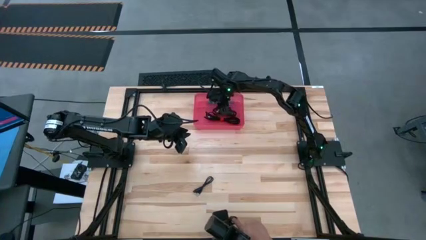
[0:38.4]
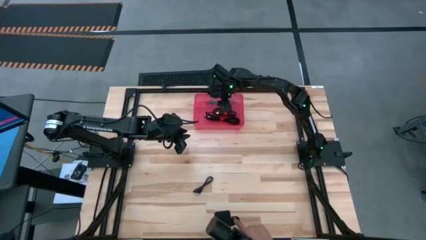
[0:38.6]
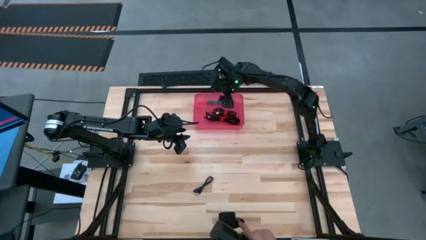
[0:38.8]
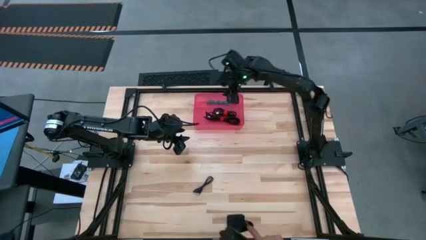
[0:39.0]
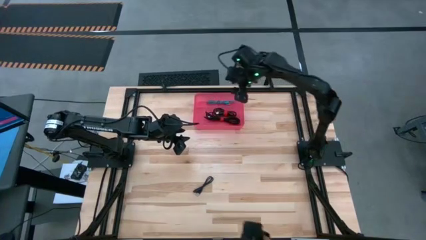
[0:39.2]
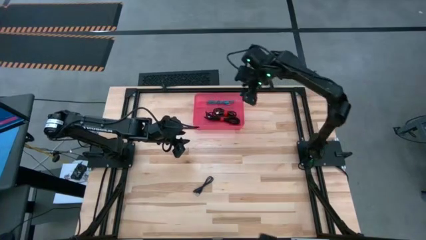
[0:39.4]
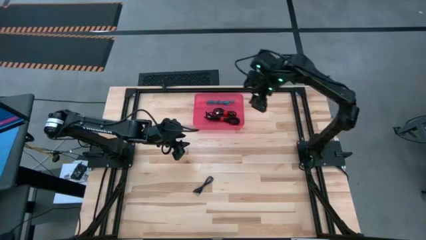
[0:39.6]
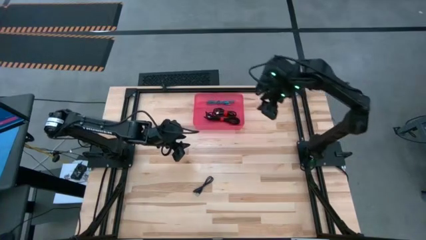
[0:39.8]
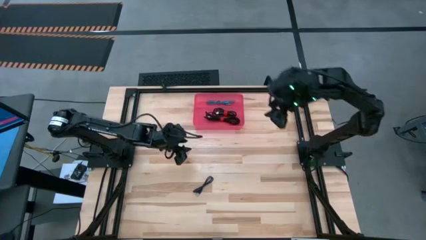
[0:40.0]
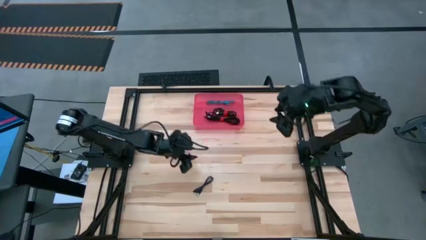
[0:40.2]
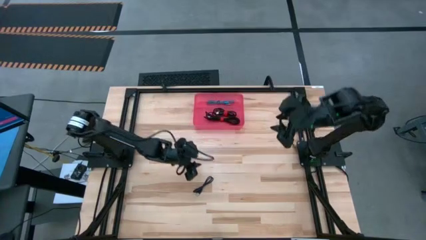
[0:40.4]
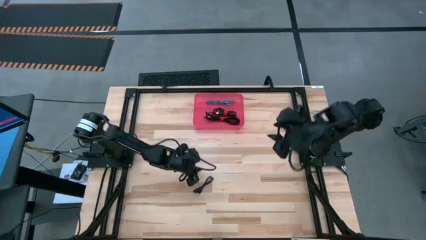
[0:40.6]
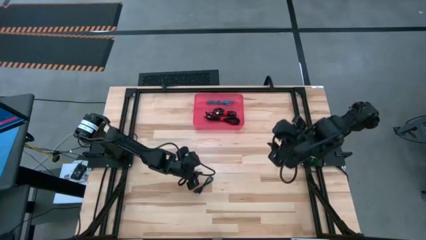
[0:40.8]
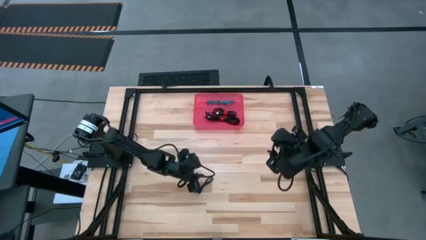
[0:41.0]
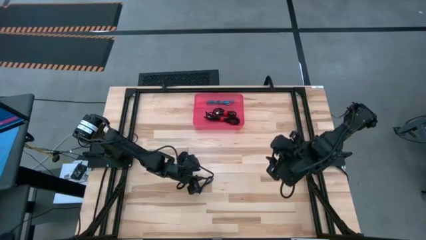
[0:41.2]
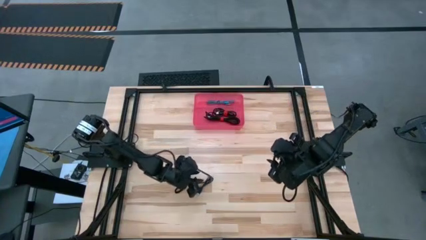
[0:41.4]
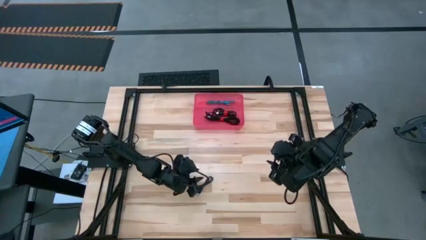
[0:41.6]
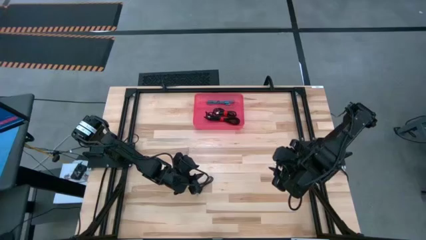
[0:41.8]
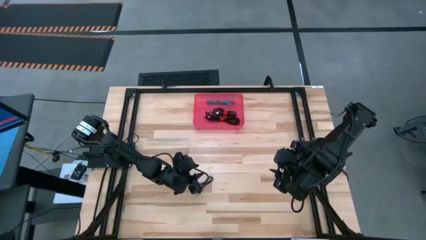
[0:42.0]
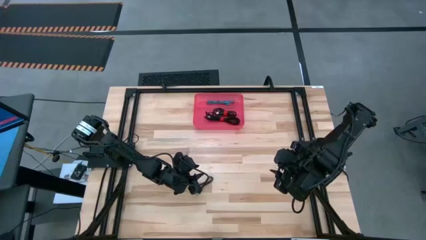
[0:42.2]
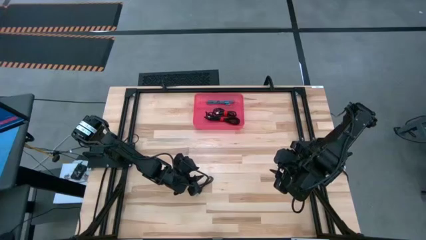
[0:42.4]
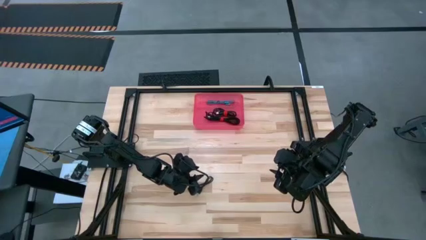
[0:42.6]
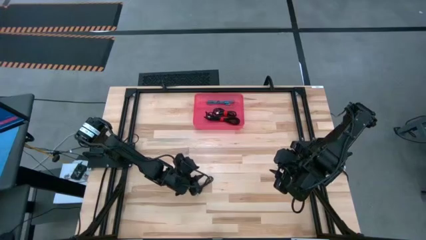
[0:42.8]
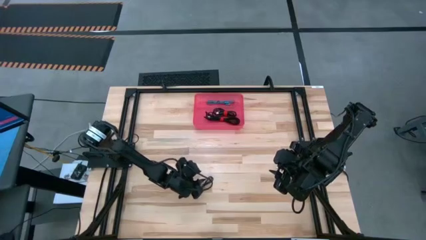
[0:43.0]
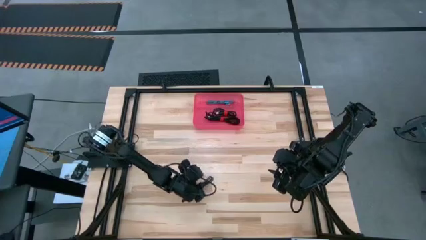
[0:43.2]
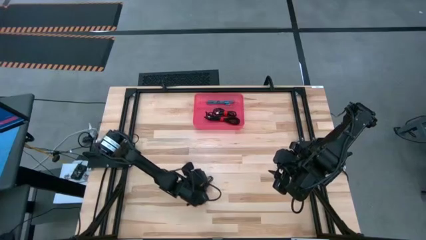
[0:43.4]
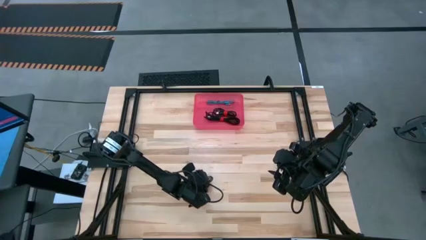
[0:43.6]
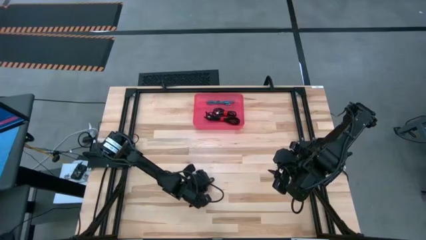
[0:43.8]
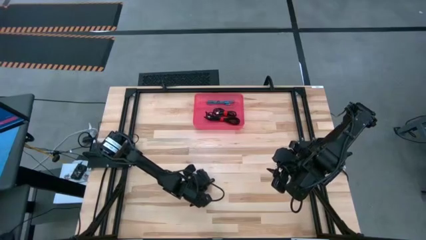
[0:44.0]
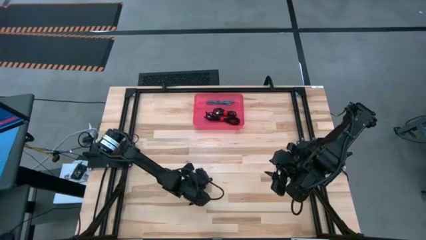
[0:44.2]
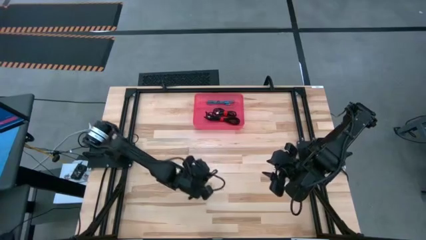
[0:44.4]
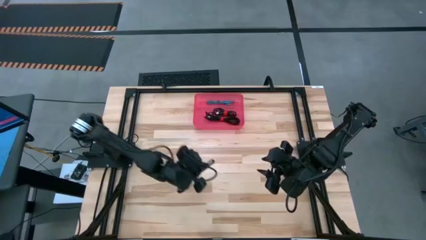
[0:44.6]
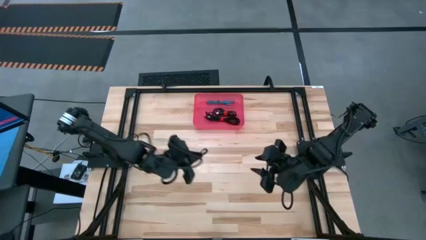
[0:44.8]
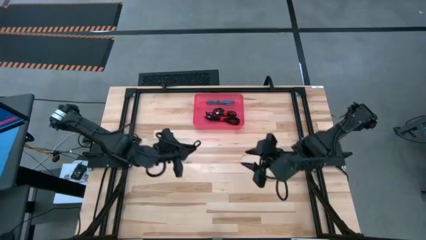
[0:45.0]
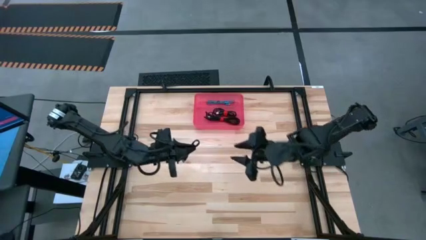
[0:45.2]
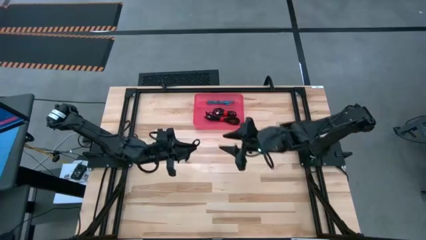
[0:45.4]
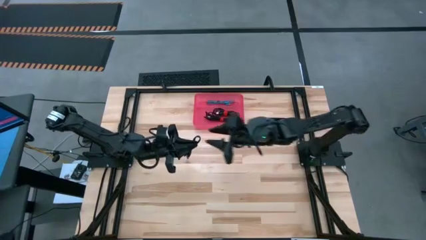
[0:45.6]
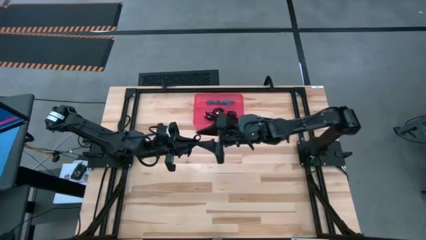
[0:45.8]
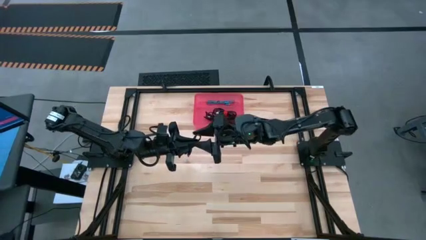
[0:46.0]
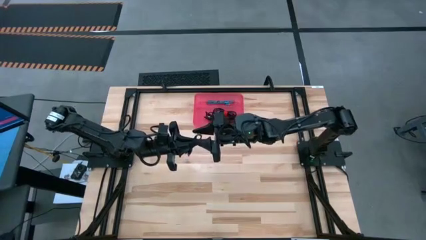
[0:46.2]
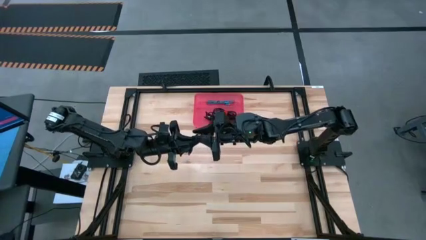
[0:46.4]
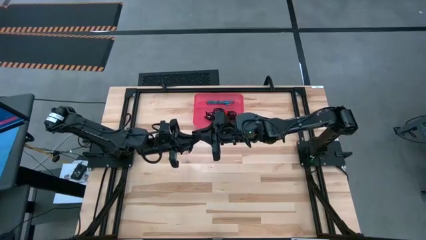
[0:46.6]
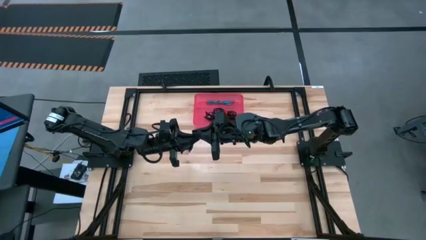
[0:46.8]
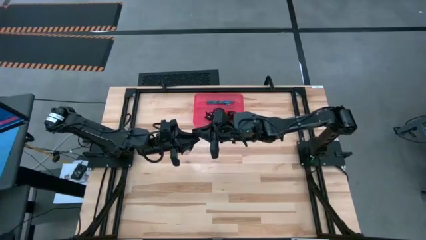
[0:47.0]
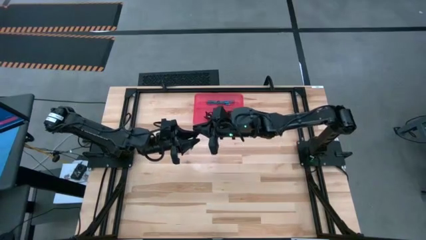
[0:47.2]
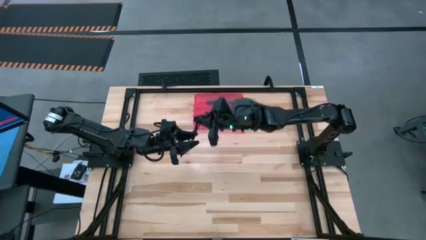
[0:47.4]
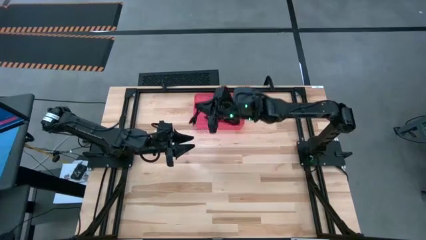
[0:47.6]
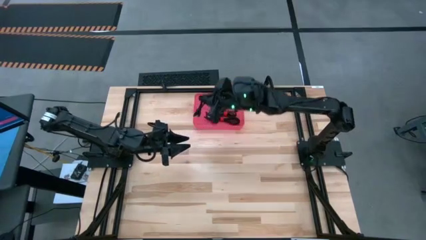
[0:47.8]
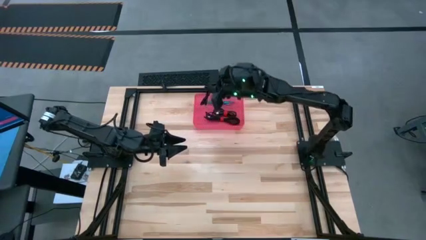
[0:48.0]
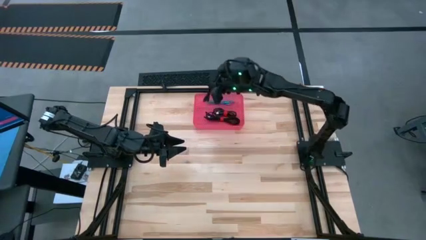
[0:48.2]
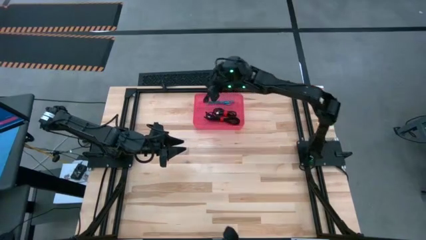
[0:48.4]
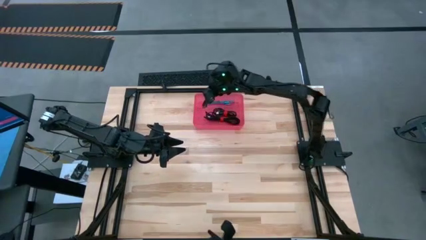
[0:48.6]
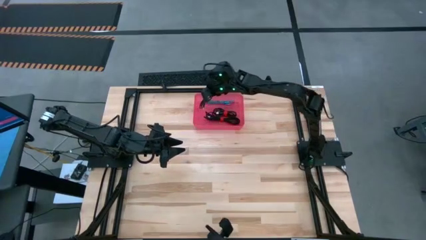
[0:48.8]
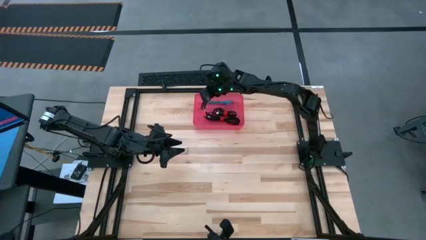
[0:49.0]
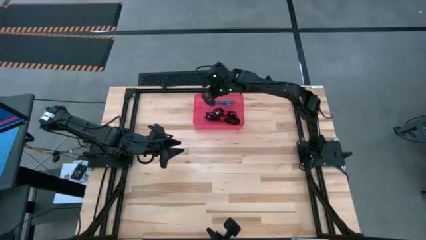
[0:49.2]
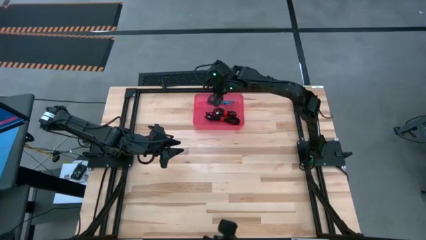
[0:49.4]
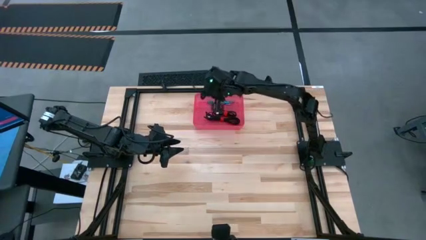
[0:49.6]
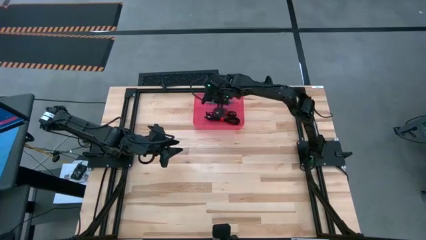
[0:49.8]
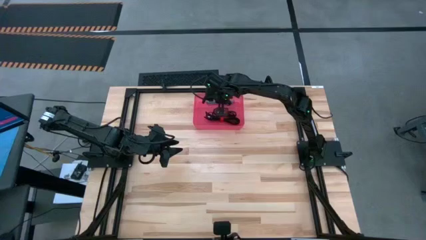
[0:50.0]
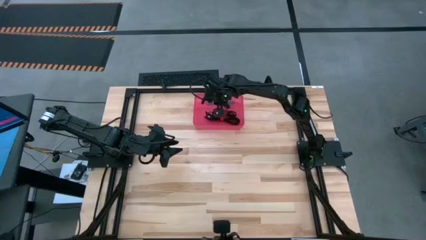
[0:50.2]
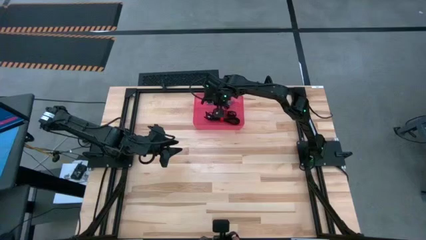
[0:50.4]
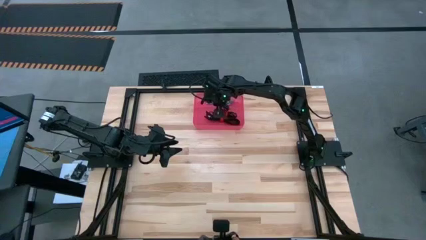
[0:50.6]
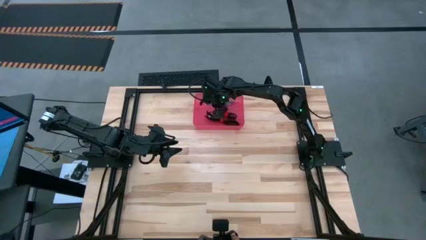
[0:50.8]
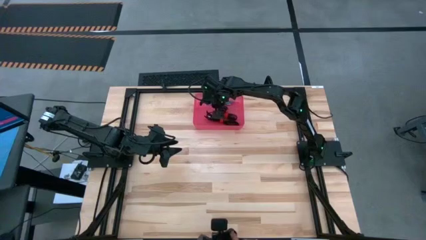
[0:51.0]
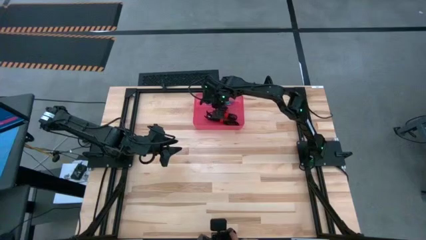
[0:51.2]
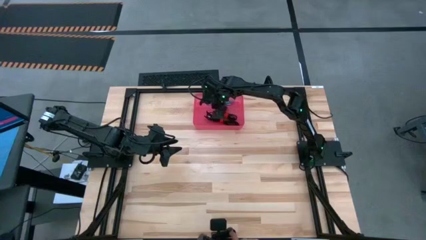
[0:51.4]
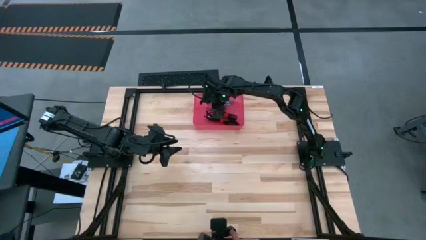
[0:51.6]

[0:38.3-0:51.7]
Task: Pick and place USB-C Cables
Put the black charger cable into the pink bin

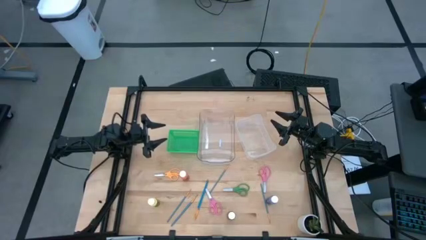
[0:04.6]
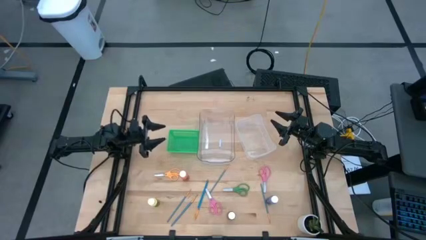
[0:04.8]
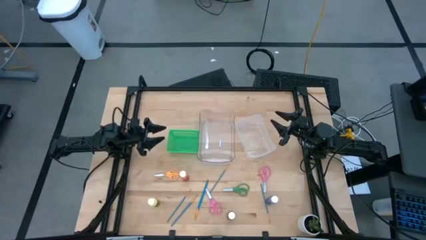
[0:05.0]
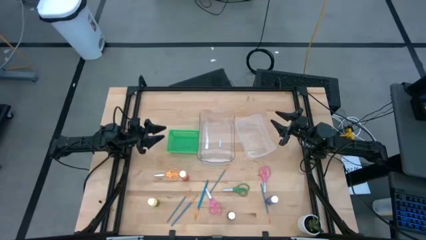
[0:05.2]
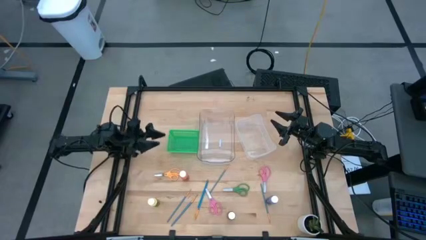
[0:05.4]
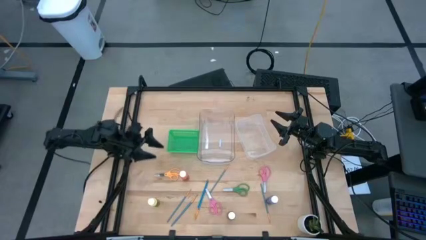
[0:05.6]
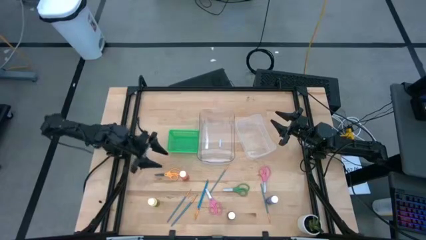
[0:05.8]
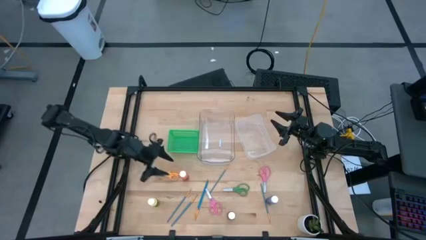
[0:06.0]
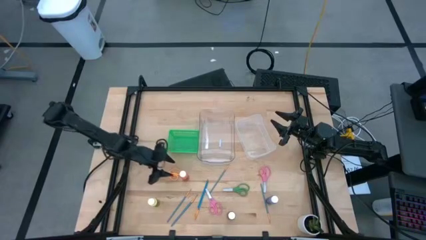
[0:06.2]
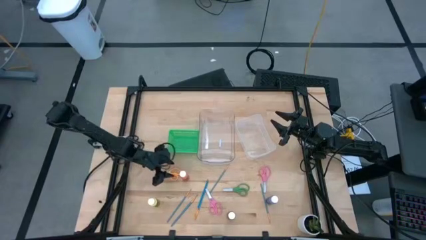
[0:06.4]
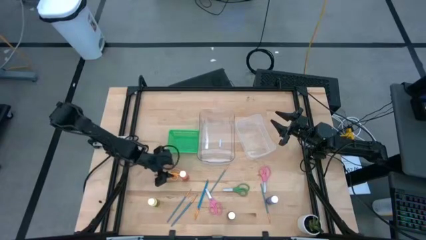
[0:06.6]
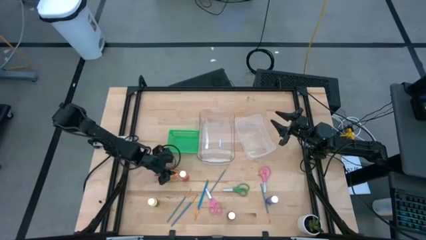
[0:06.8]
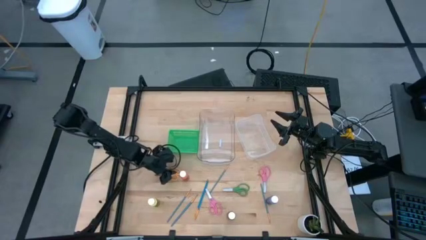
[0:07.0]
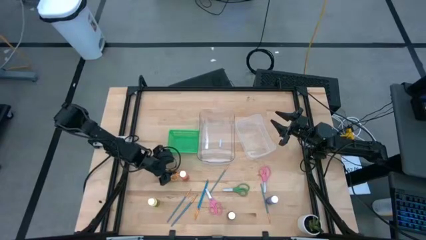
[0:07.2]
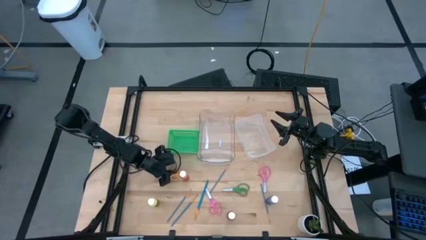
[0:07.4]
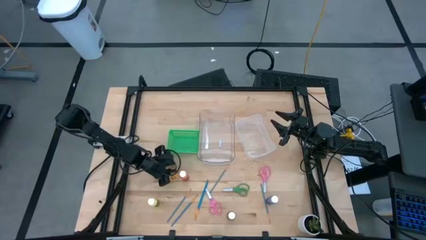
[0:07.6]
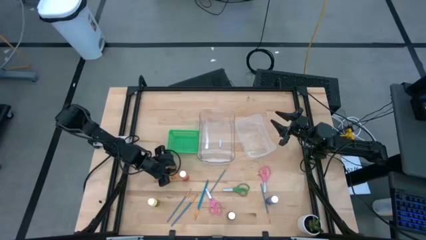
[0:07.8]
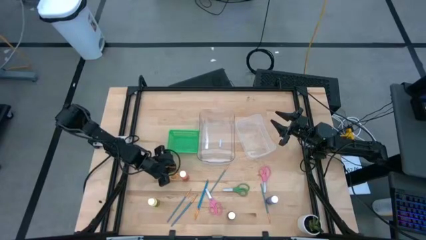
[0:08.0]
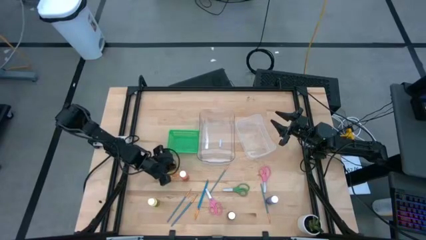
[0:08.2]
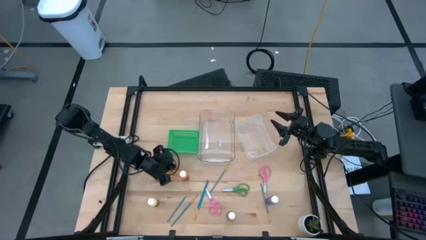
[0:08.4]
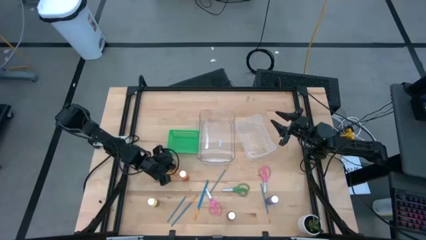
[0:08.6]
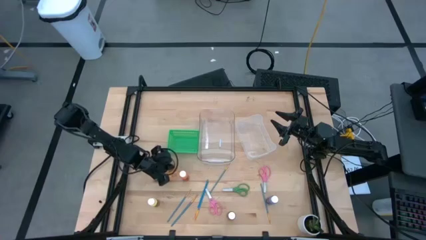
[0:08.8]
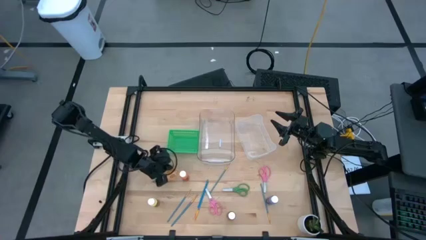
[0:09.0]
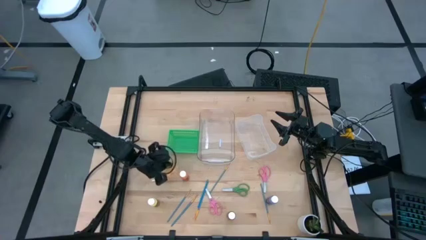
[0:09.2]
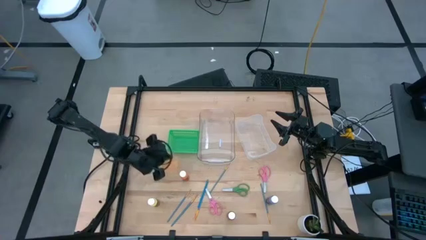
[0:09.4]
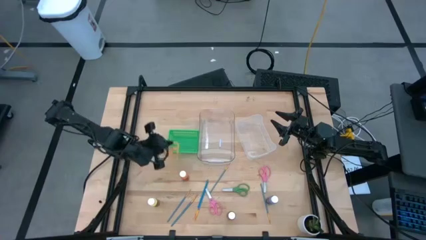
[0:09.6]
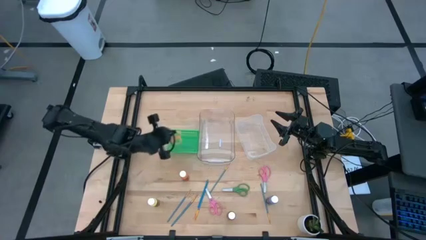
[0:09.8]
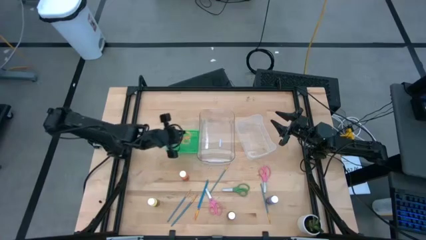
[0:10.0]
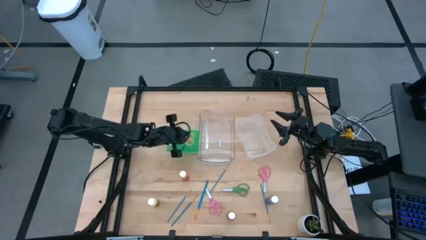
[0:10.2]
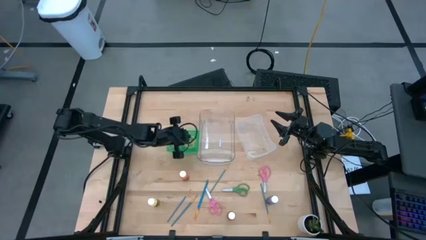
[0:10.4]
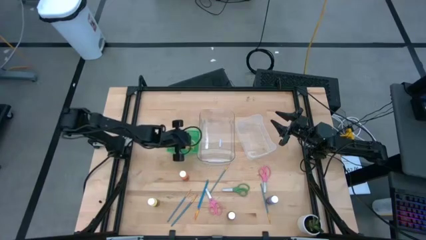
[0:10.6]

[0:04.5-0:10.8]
Task: Pick & Place Paint Supplies
Put the yellow scissors into the green bin
